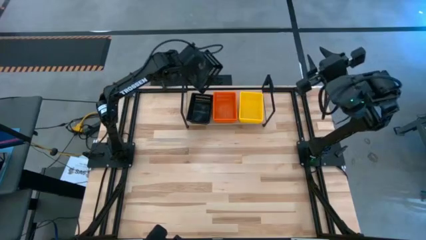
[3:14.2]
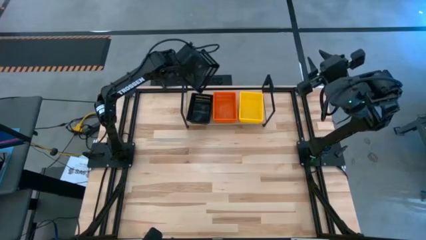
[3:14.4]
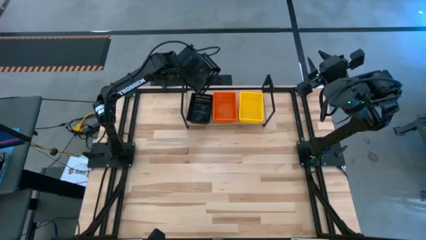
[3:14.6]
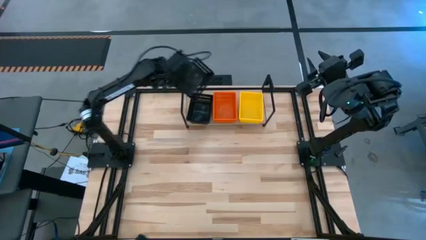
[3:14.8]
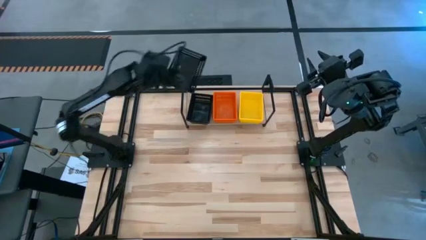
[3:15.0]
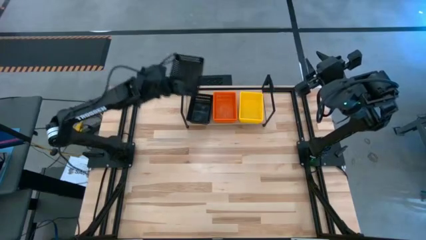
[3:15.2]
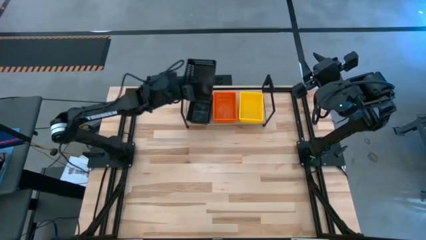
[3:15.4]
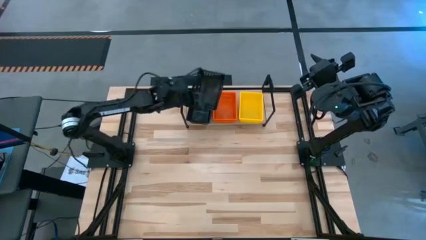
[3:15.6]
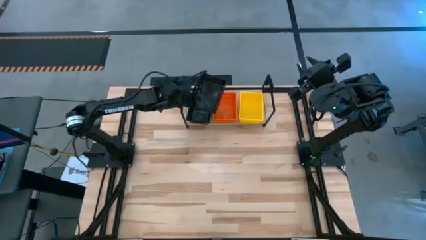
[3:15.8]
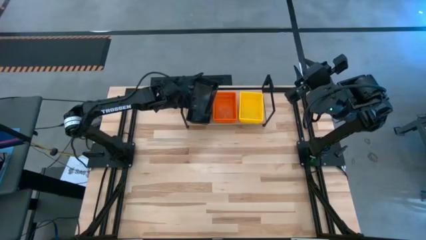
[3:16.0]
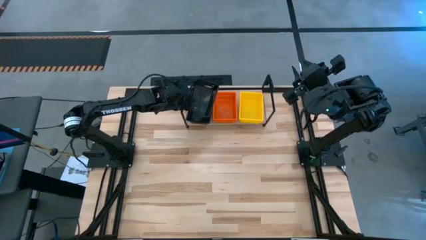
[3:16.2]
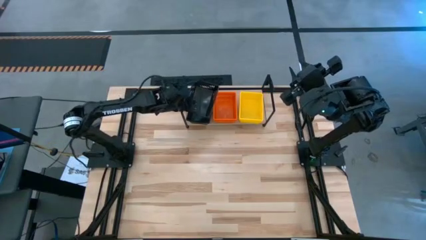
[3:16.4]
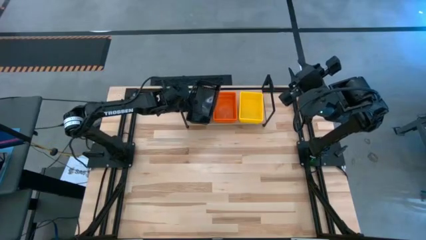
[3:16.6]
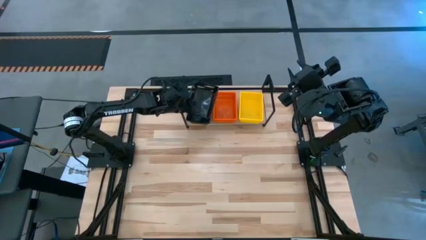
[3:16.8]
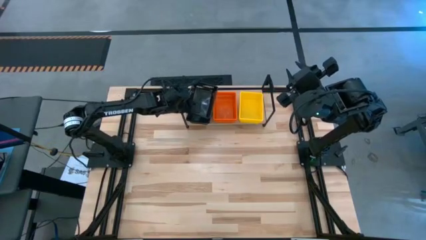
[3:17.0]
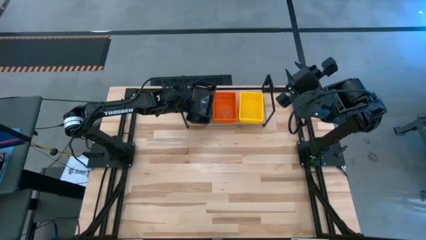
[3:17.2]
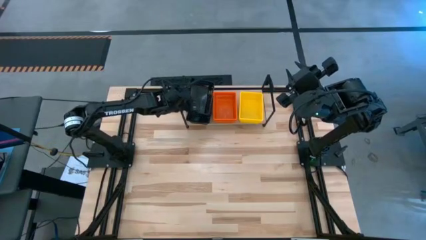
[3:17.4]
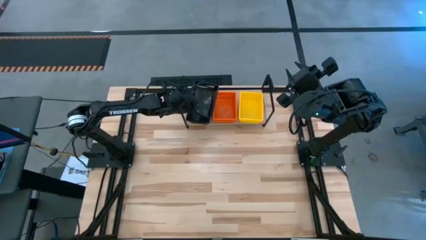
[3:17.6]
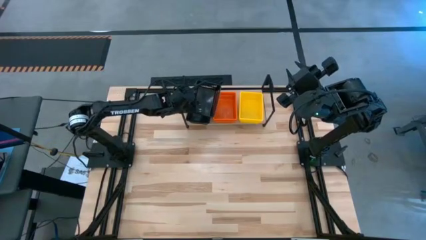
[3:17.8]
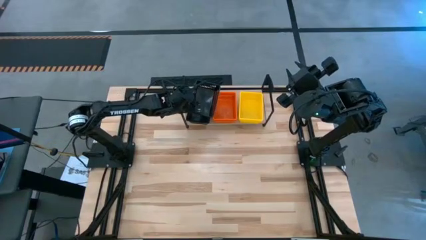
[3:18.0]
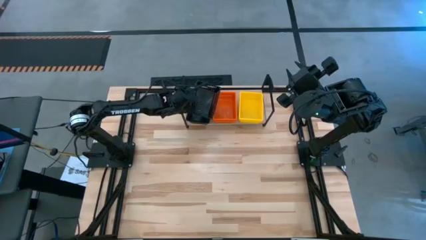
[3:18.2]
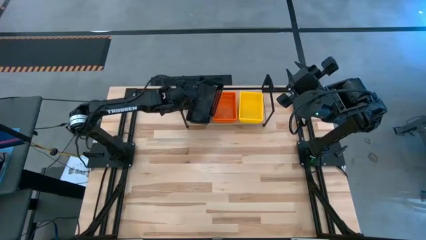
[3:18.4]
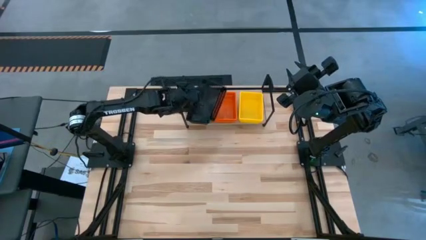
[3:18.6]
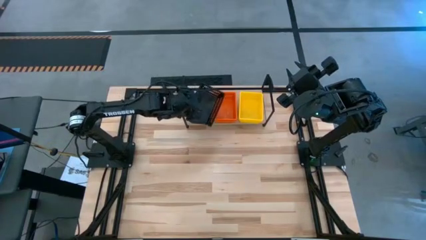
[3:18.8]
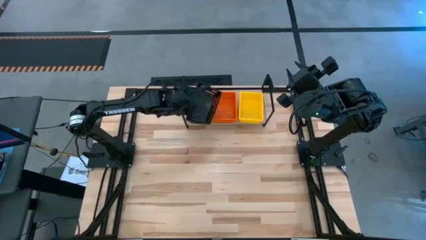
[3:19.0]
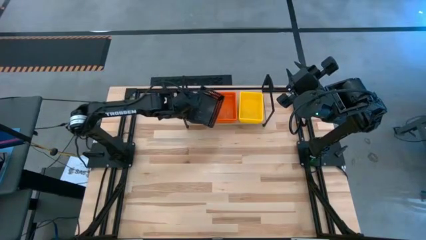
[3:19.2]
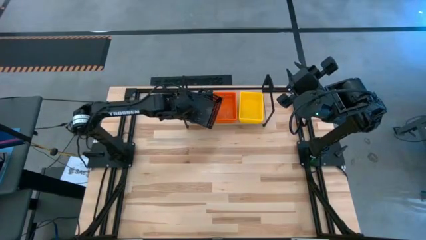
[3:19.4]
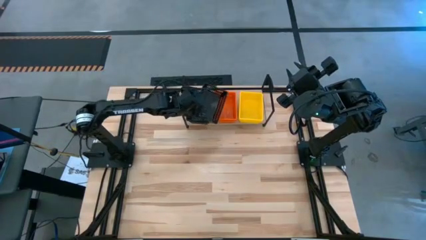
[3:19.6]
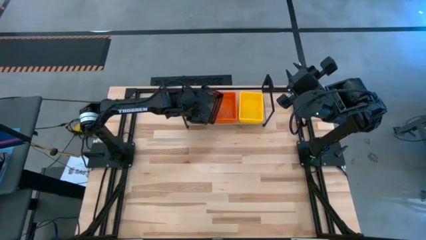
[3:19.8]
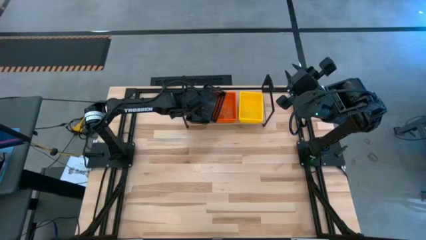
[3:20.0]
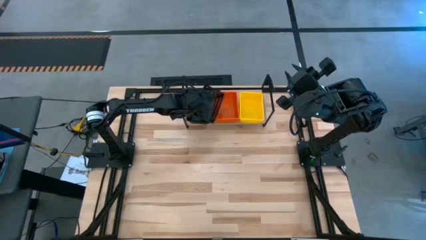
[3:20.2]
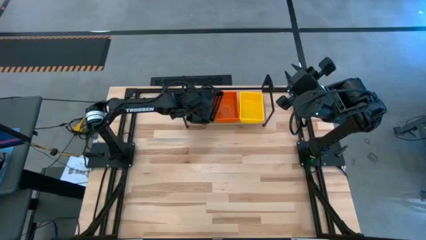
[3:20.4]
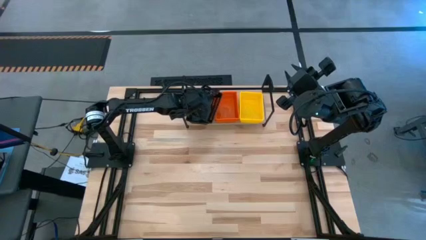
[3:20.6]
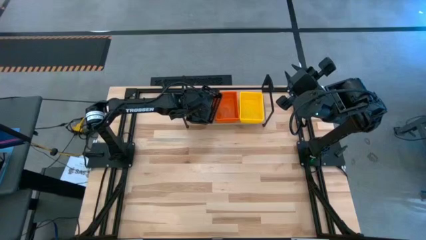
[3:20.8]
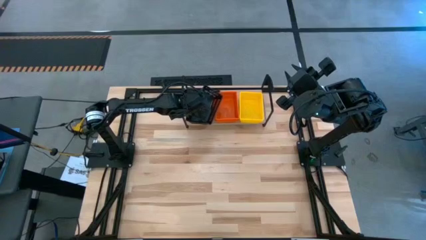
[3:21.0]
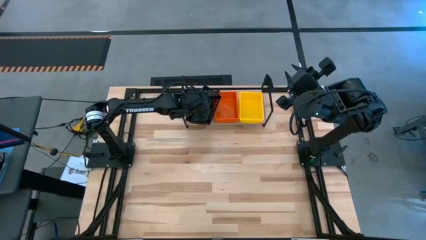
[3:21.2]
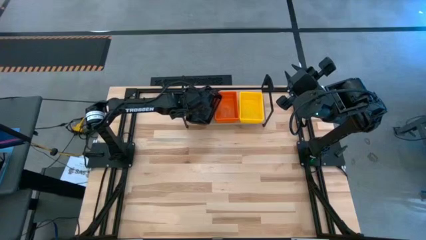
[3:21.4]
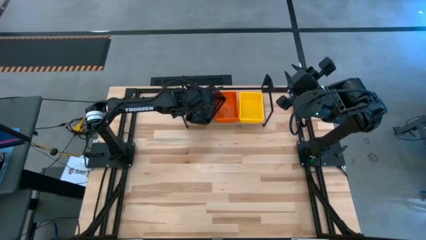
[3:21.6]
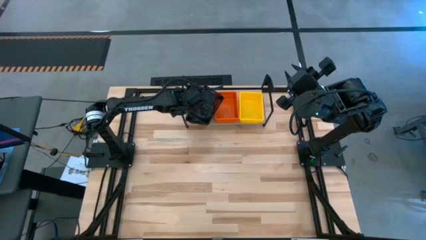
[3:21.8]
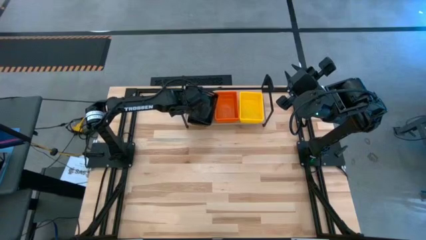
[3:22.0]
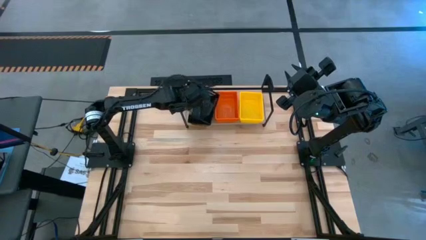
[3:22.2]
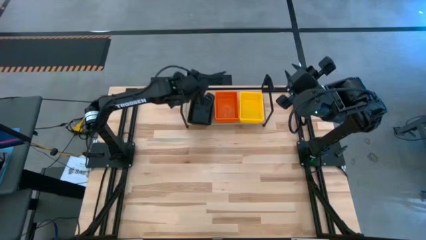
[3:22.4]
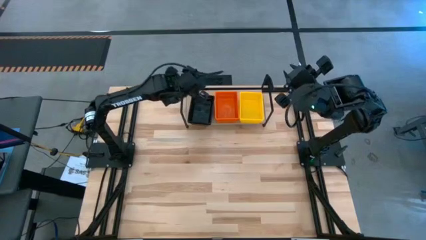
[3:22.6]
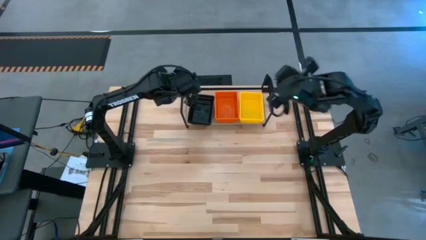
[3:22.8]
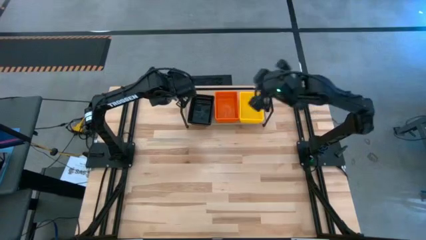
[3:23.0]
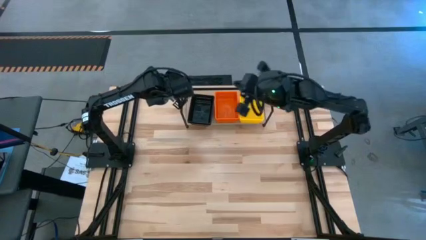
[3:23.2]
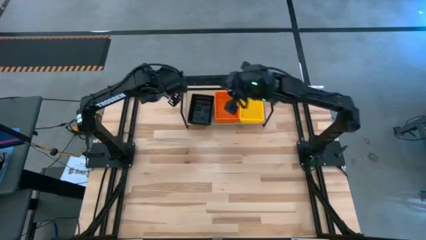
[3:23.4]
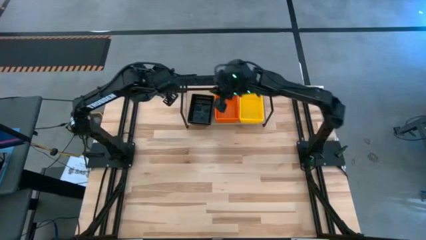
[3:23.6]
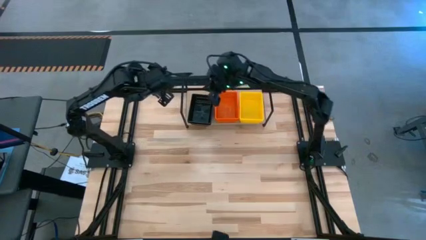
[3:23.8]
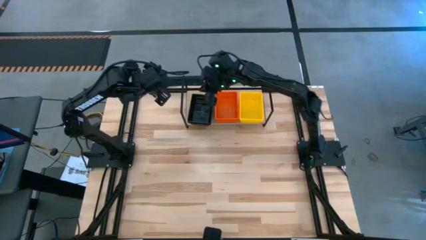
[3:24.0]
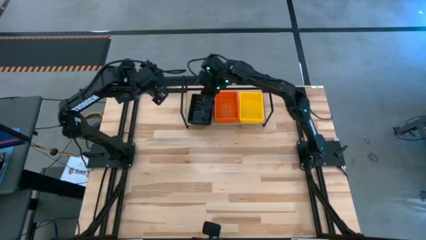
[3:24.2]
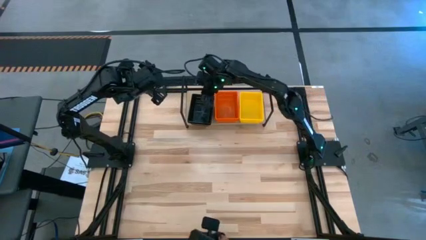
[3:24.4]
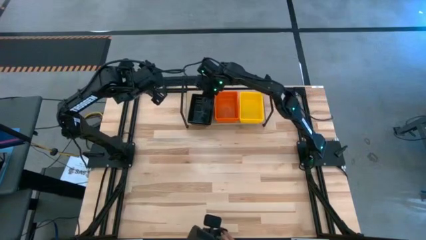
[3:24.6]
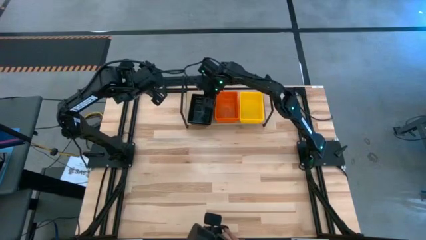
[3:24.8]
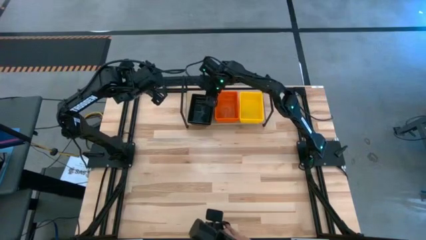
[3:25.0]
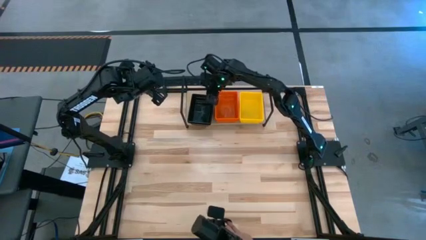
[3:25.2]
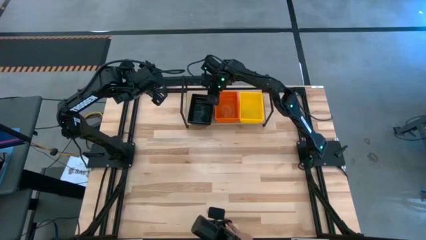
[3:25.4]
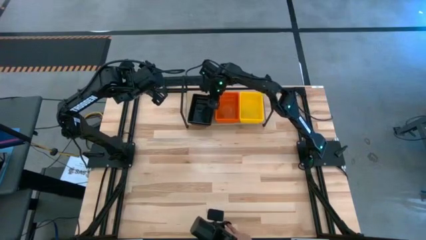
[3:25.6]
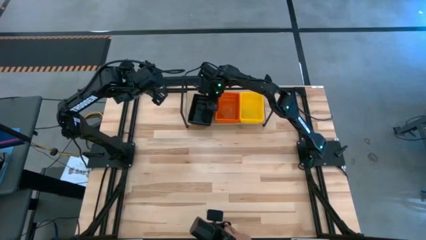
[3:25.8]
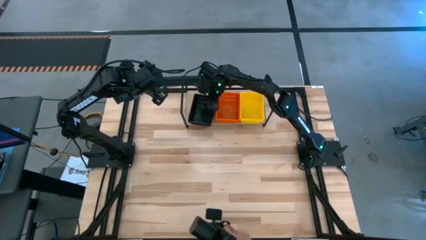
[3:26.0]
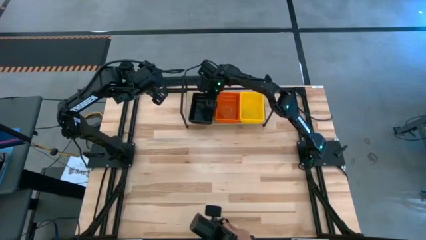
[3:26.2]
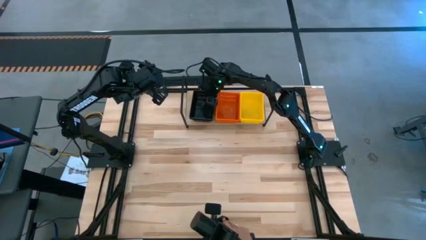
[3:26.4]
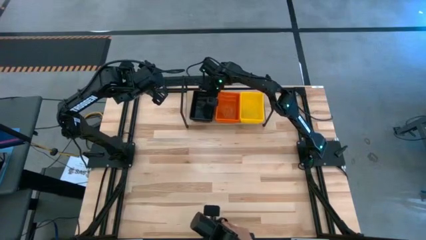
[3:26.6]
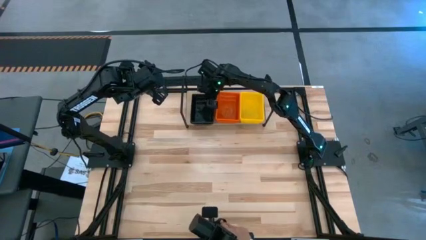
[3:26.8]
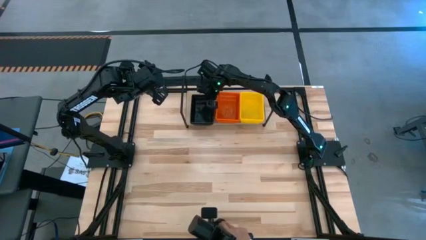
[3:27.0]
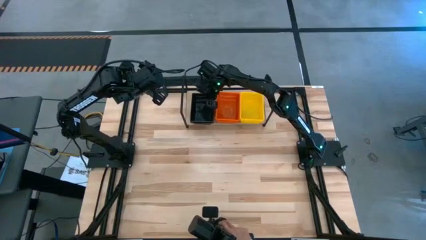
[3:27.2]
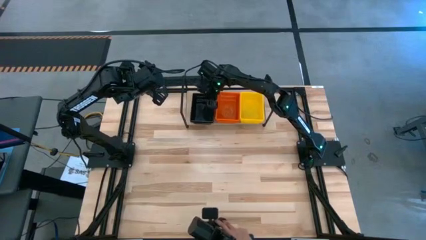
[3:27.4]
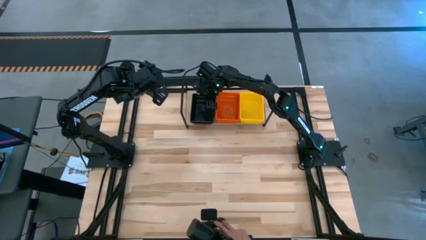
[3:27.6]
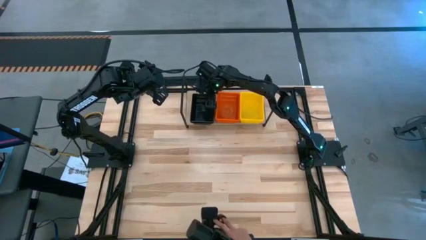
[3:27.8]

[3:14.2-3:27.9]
Task: Stack baskets on shelf by color
Stack the black bin on top of the other black bin on the shelf
